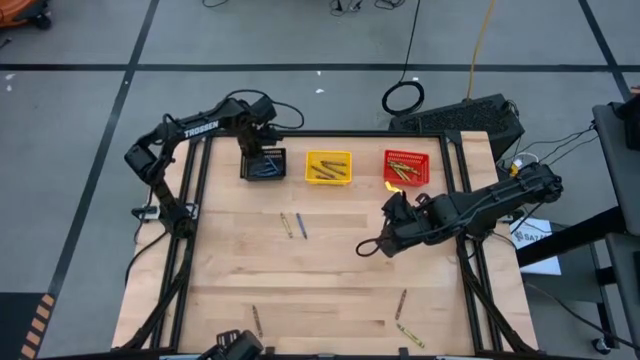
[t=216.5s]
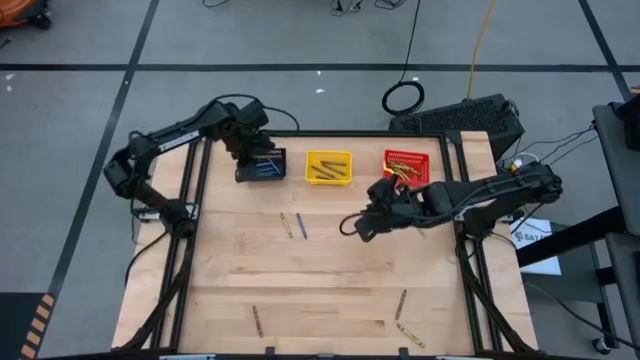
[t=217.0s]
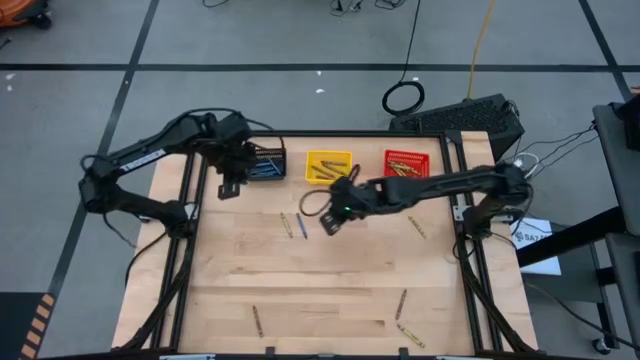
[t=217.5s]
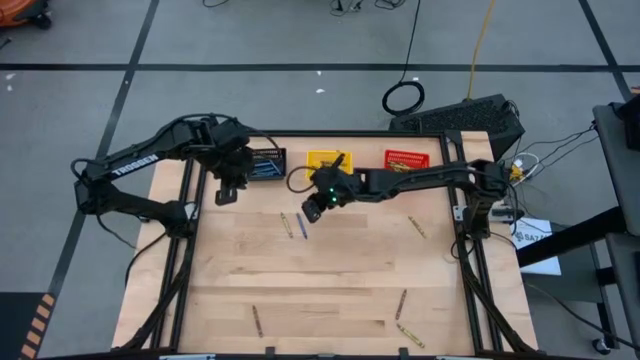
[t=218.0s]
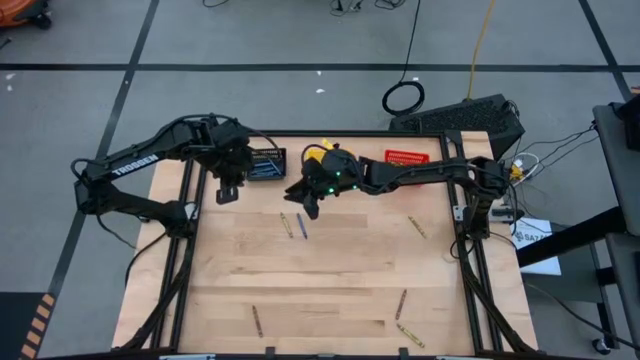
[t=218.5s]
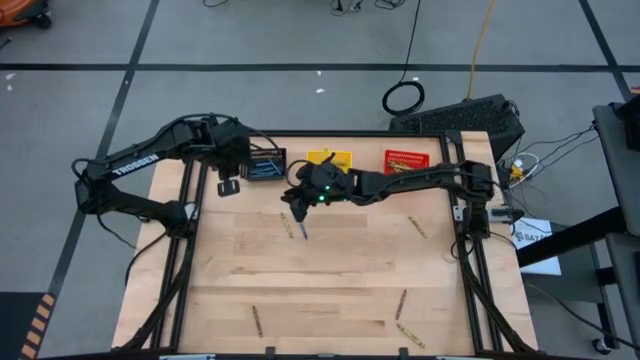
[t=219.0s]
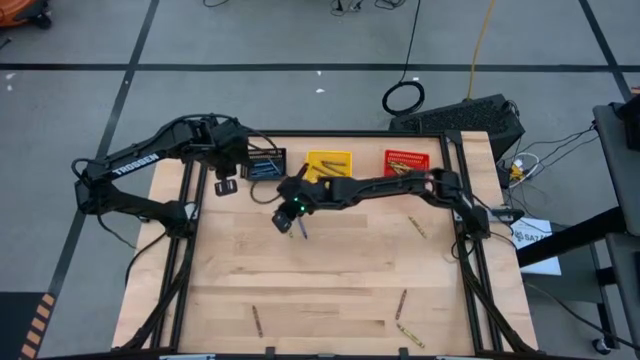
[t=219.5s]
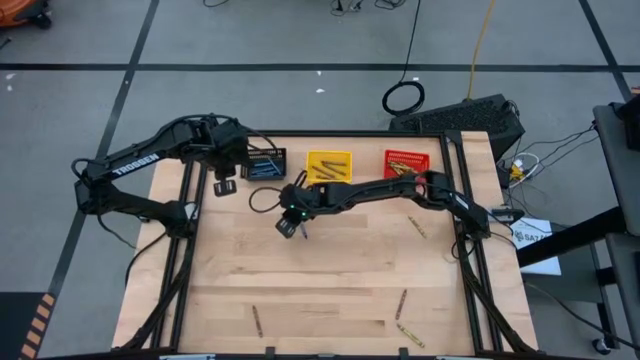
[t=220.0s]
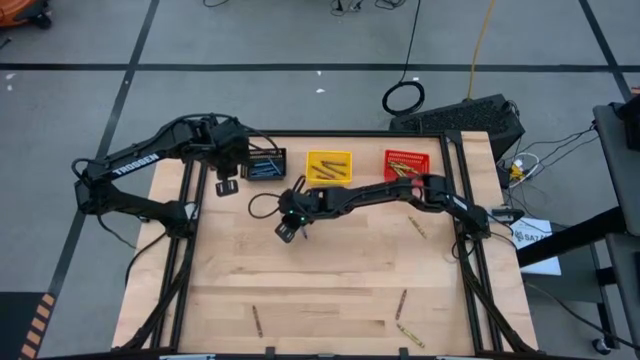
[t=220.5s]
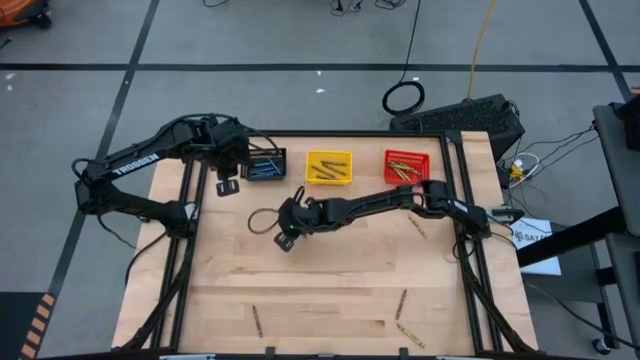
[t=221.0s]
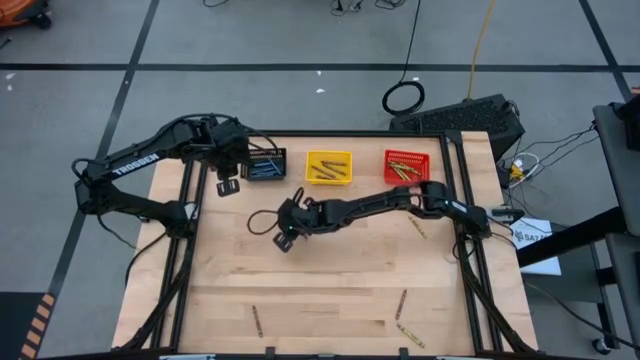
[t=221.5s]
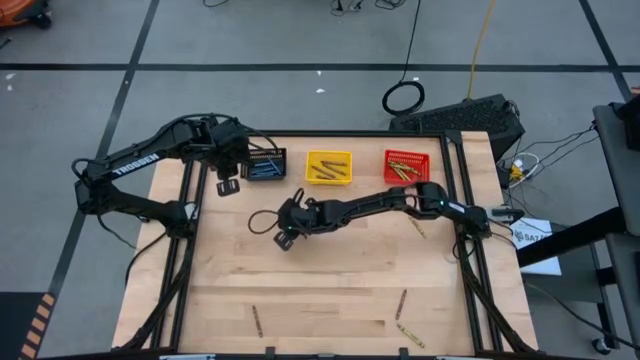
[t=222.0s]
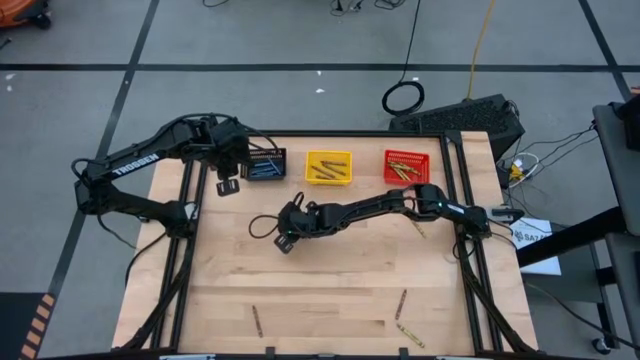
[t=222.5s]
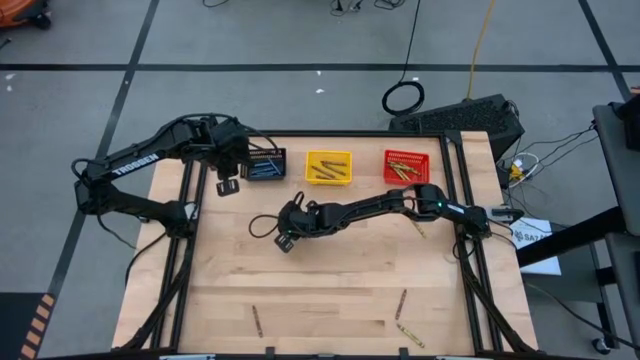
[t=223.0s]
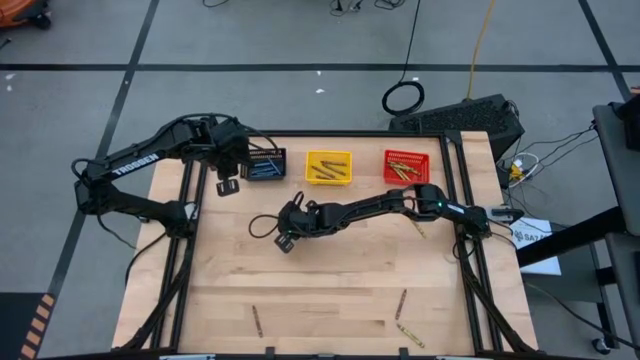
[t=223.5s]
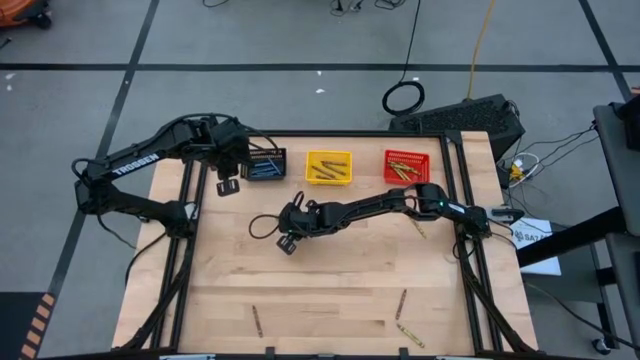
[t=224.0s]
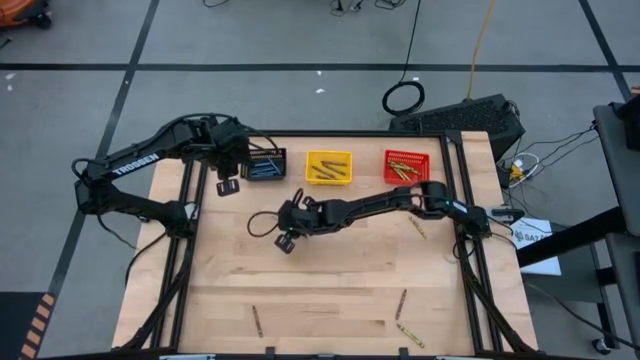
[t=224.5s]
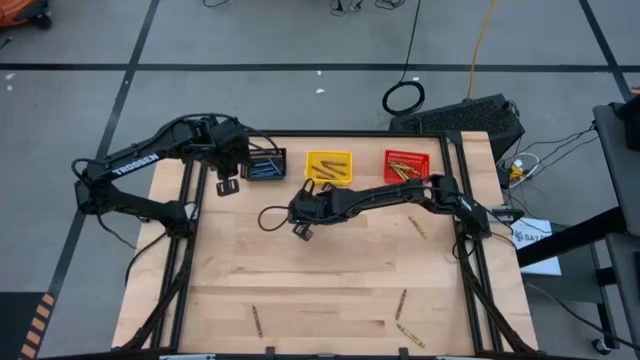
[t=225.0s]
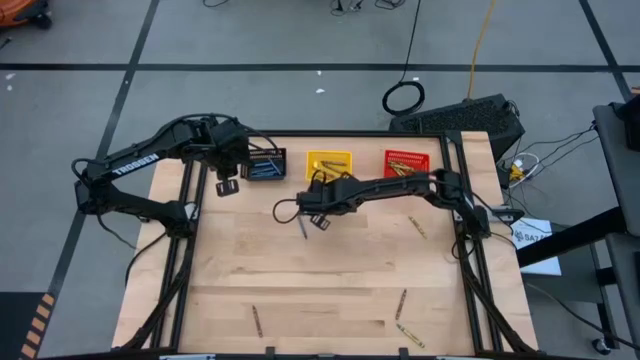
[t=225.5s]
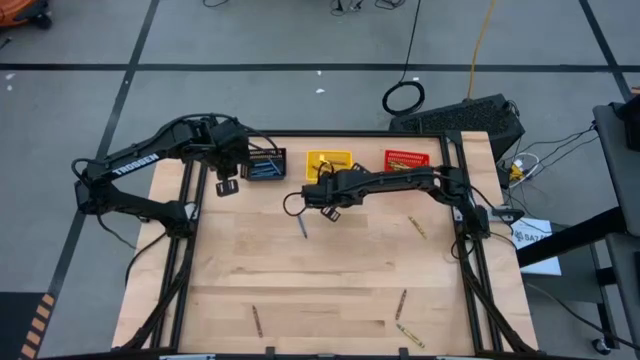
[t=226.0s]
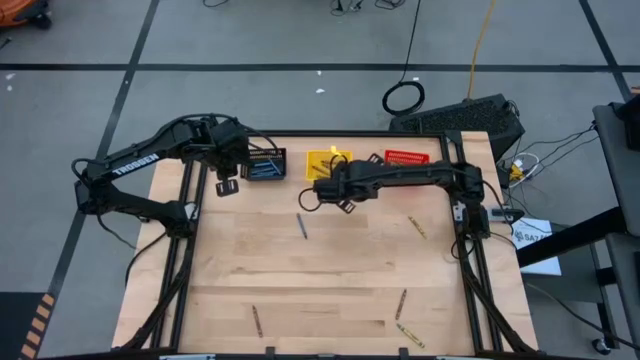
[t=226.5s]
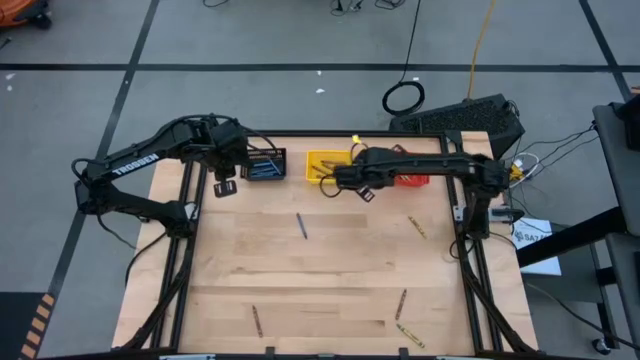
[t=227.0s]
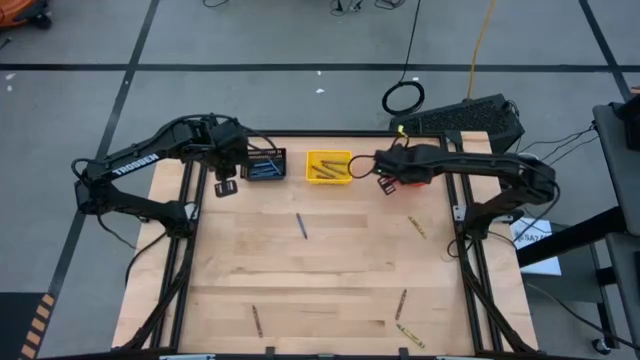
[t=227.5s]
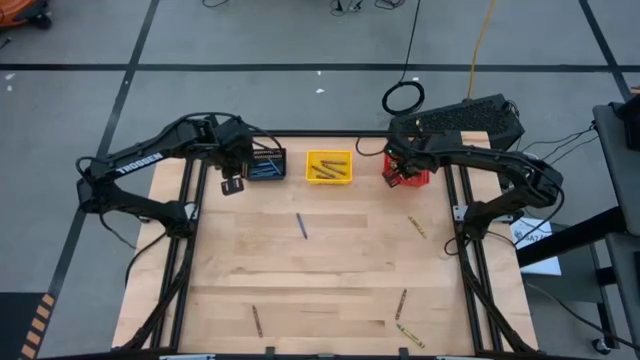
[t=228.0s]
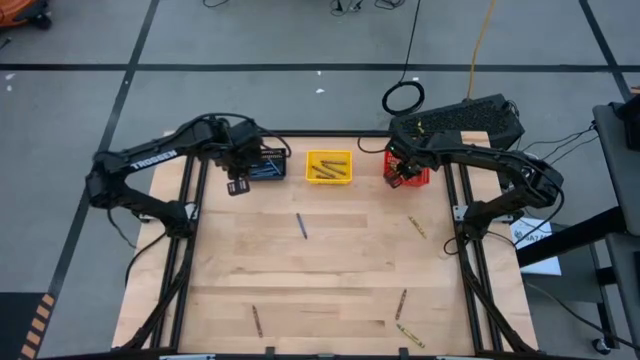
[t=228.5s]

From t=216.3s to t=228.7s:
Task: Sort crayons
Put the green crayon into the red bin

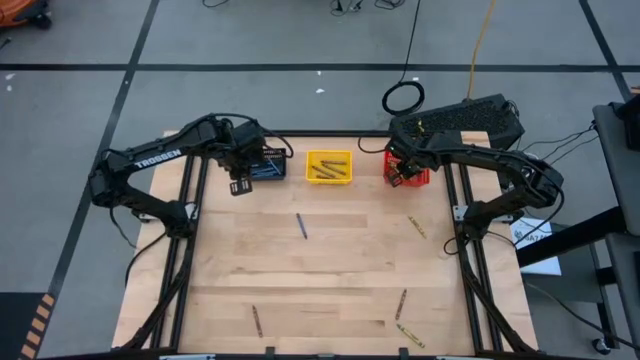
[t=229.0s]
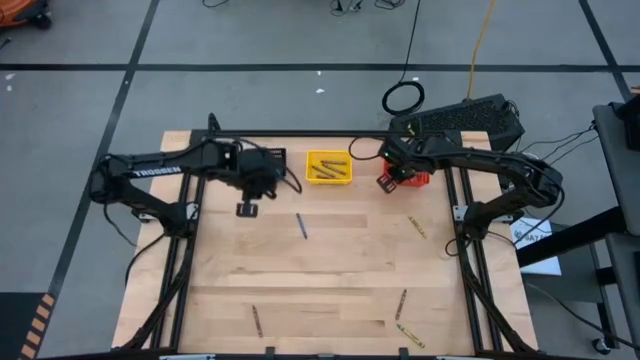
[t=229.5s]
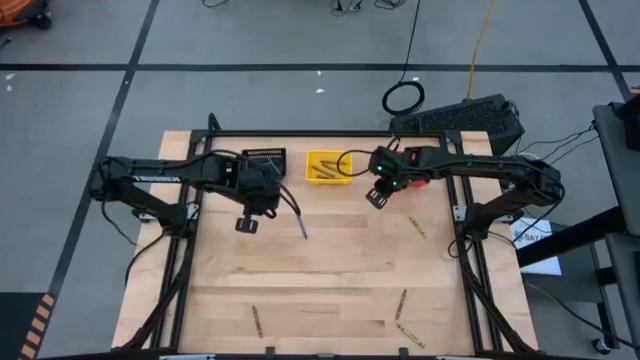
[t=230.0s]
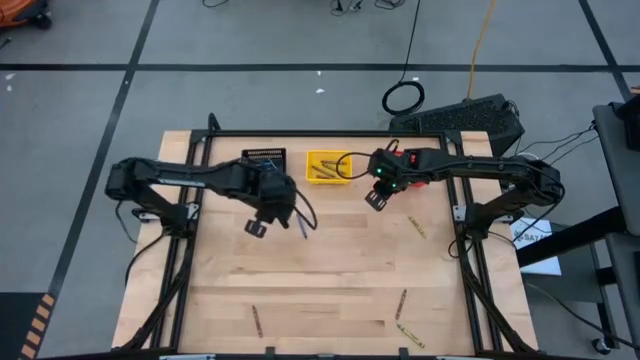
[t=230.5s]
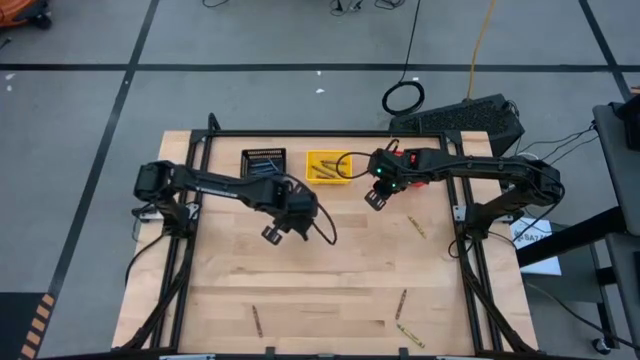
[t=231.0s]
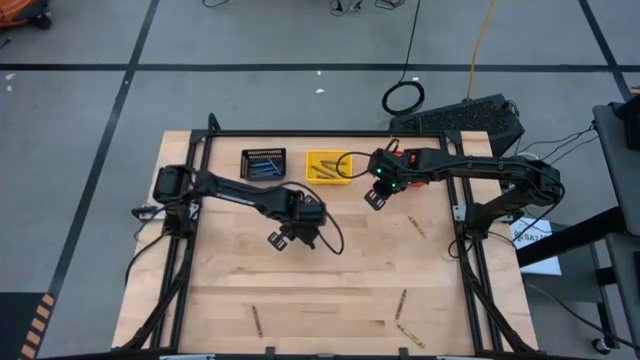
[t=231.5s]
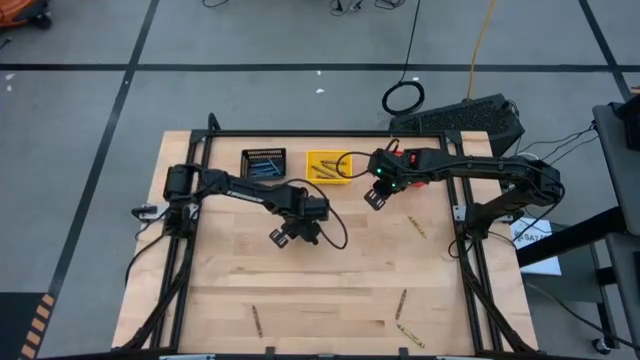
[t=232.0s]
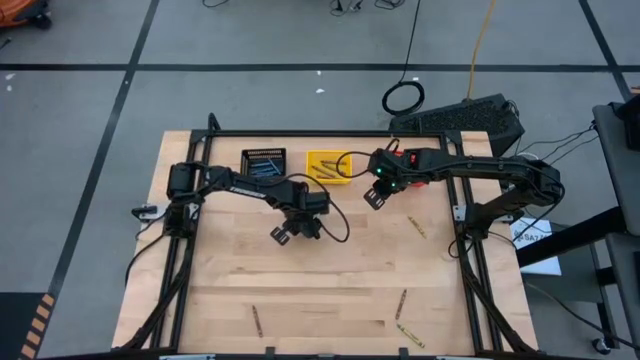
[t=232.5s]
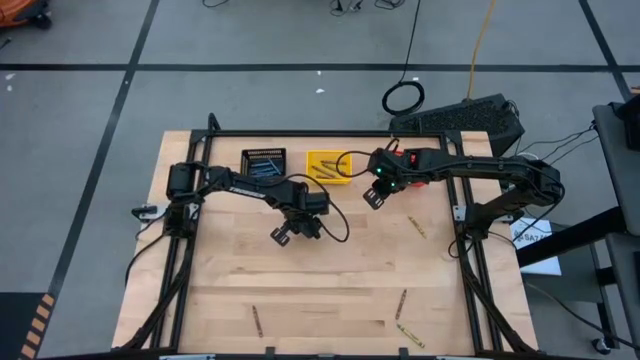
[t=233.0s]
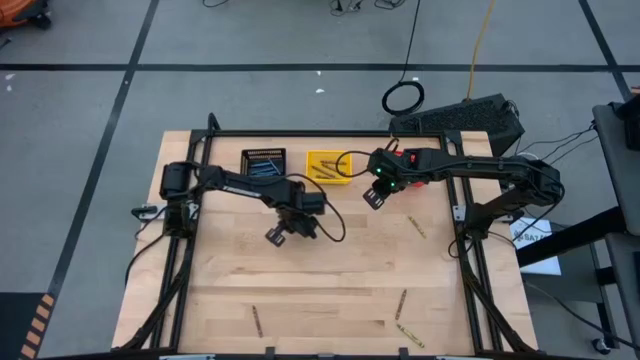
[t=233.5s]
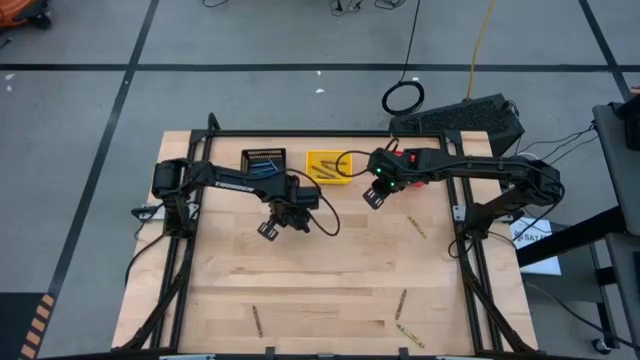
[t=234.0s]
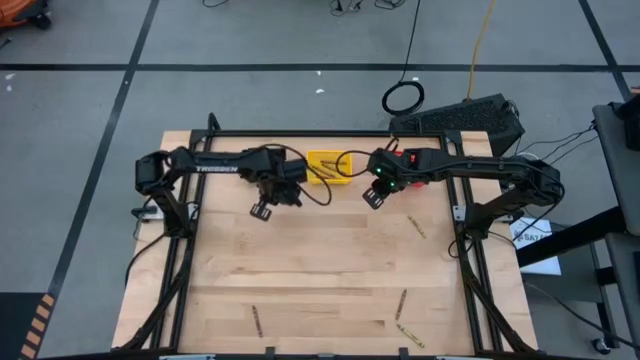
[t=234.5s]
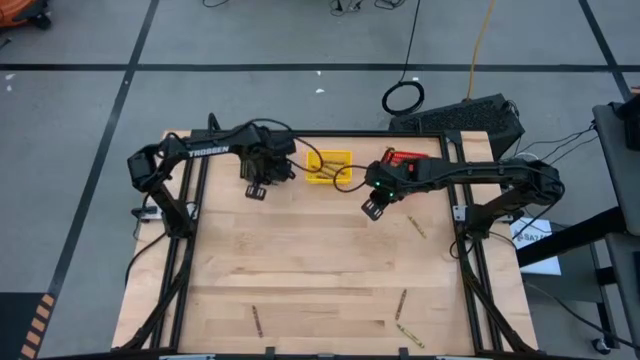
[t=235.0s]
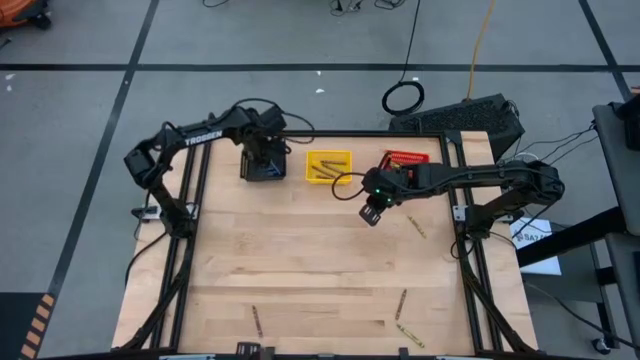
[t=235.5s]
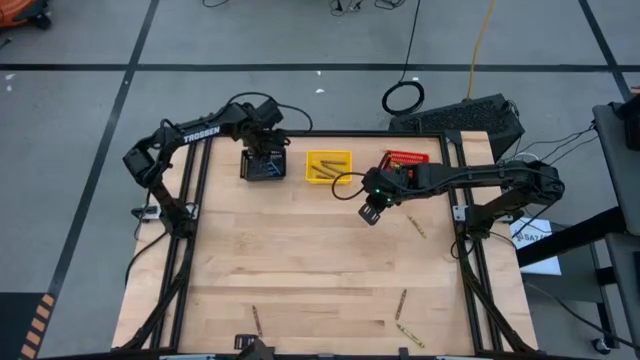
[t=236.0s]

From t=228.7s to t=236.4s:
Put the blue crayon into the black bin

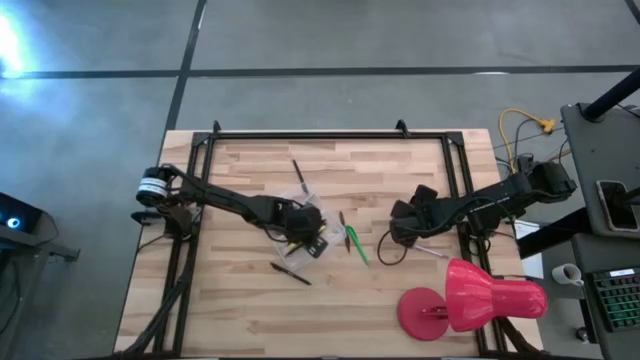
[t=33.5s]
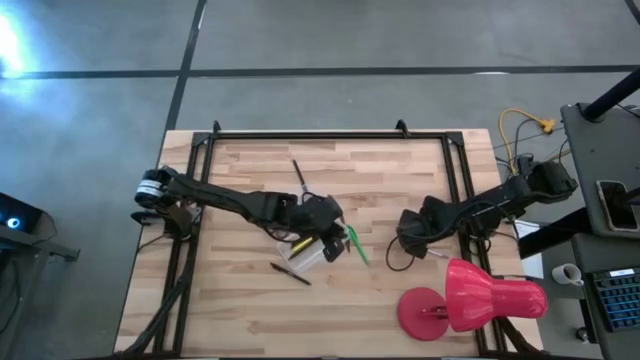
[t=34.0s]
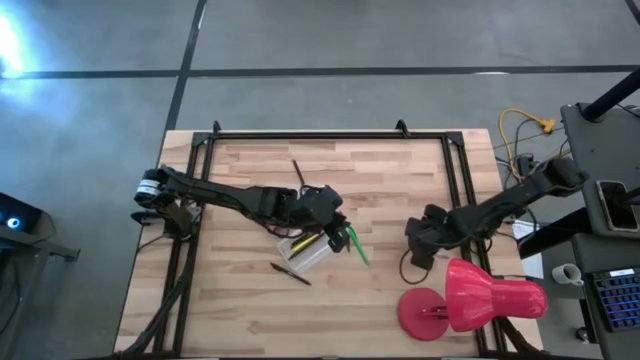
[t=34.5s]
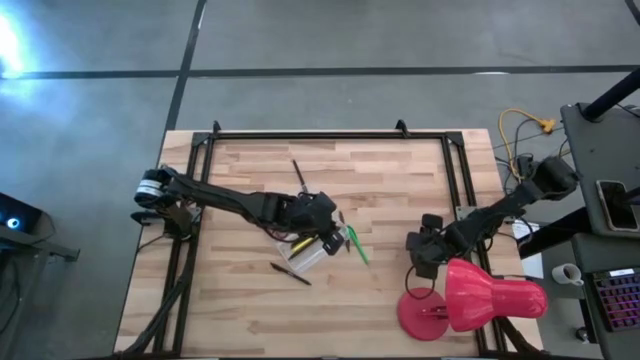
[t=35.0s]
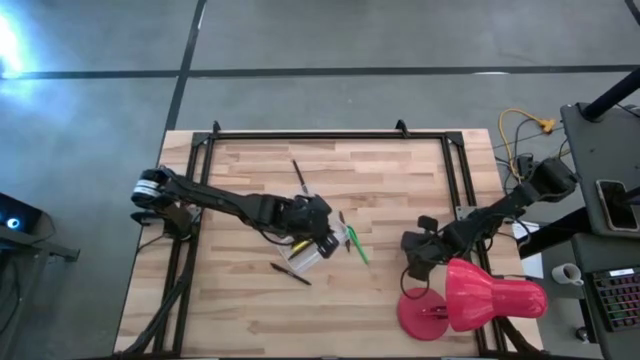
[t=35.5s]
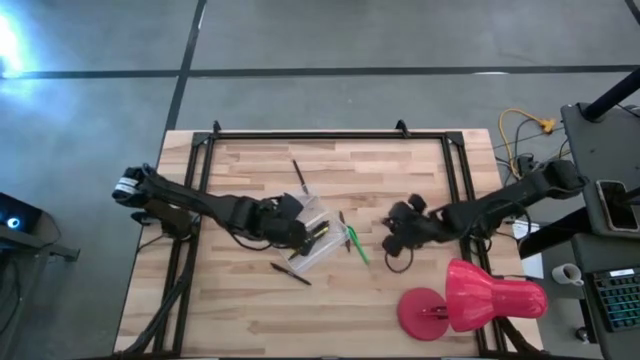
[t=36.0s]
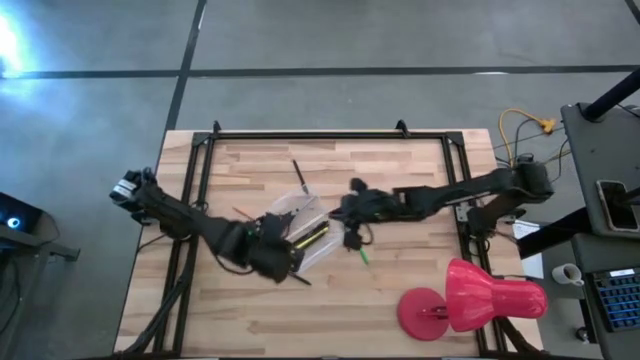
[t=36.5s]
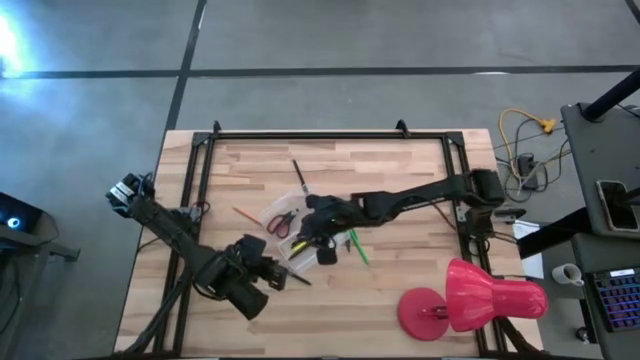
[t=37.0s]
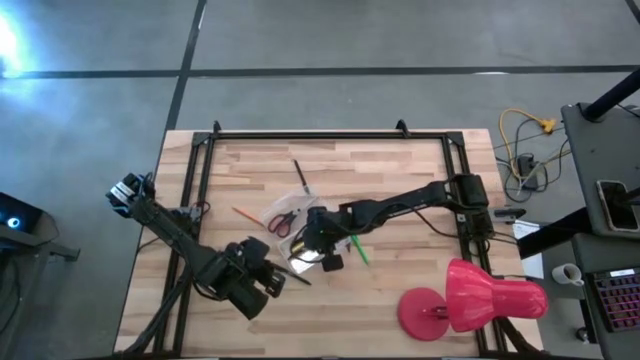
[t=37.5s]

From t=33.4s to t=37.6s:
Task: Pick & place school supplies into a supply box
Put the violet pen into the stationery box
